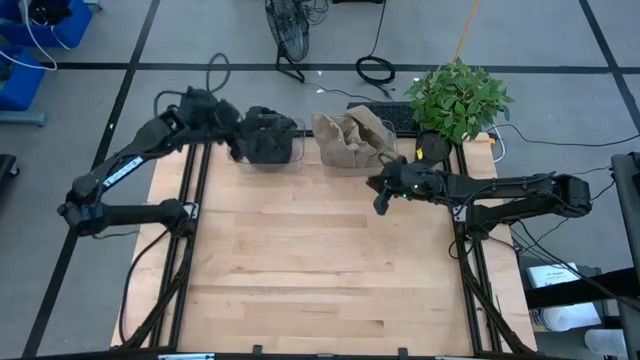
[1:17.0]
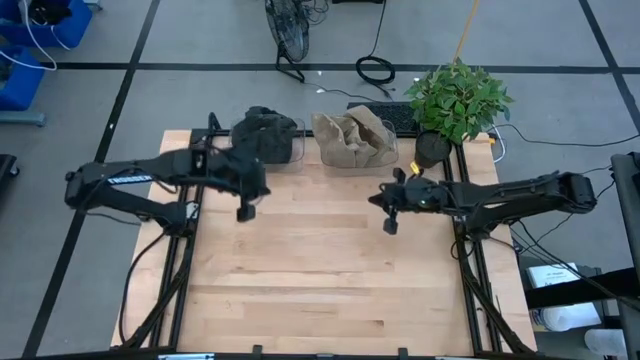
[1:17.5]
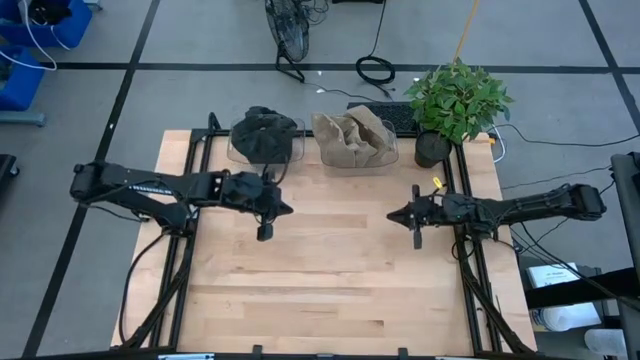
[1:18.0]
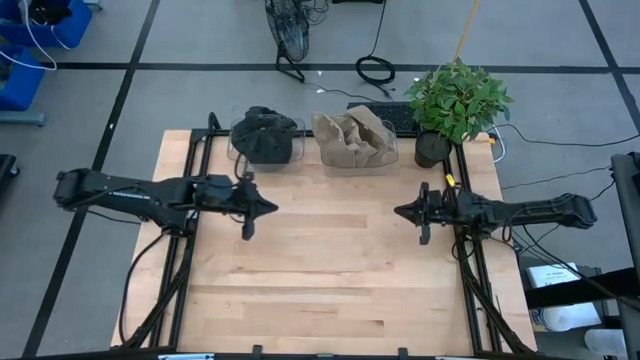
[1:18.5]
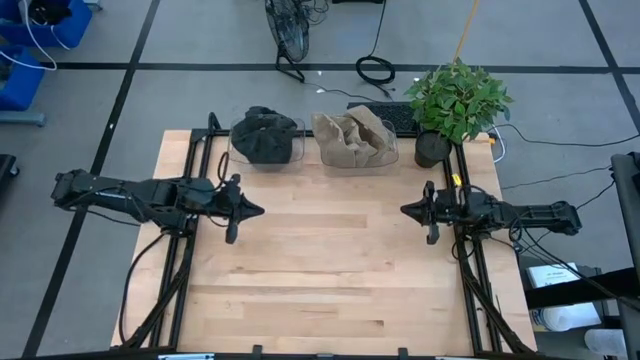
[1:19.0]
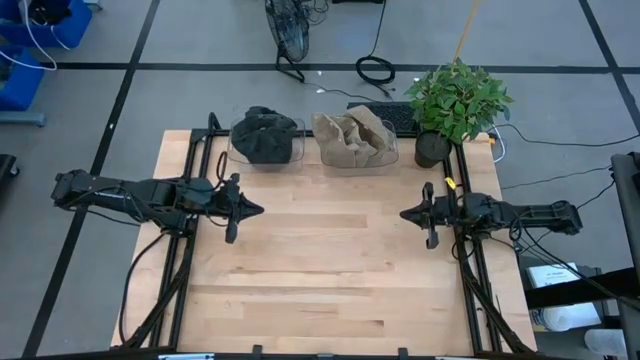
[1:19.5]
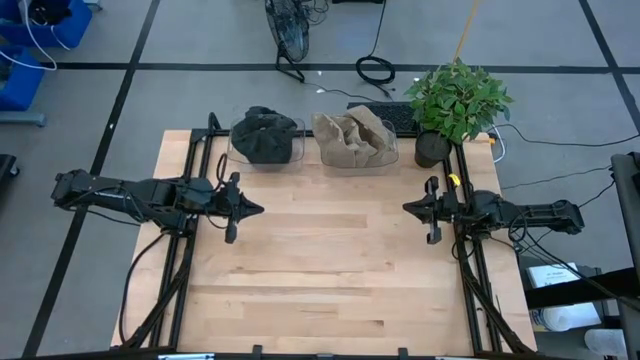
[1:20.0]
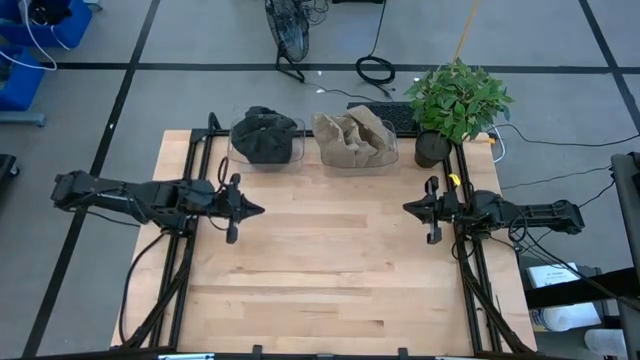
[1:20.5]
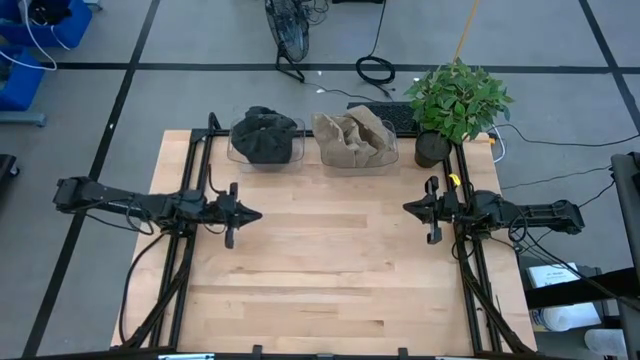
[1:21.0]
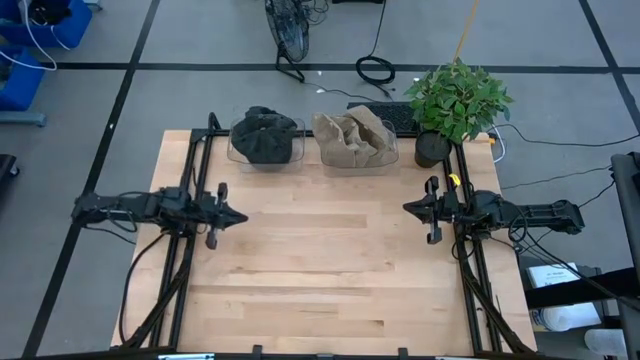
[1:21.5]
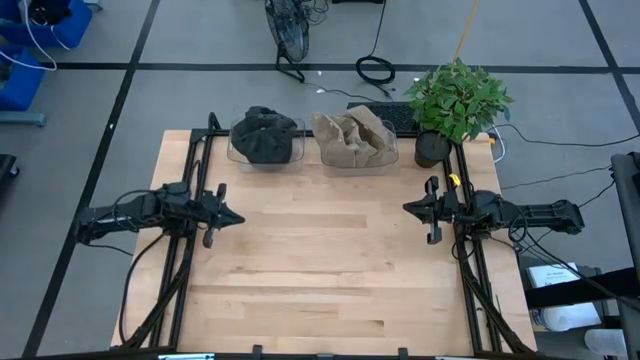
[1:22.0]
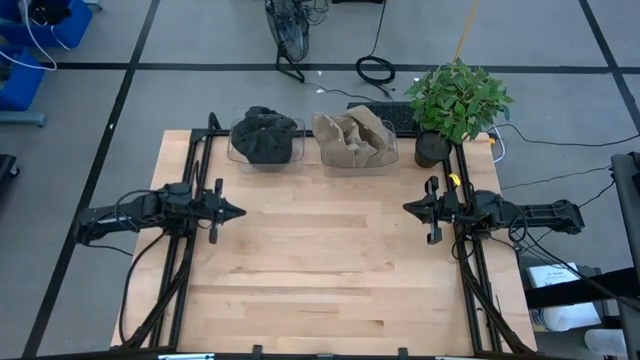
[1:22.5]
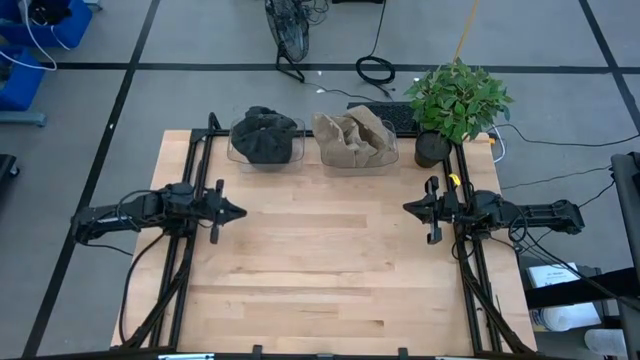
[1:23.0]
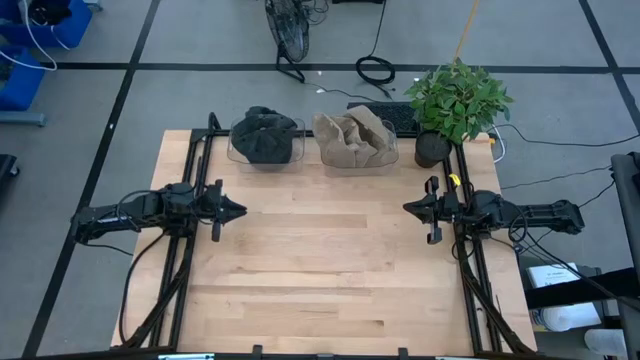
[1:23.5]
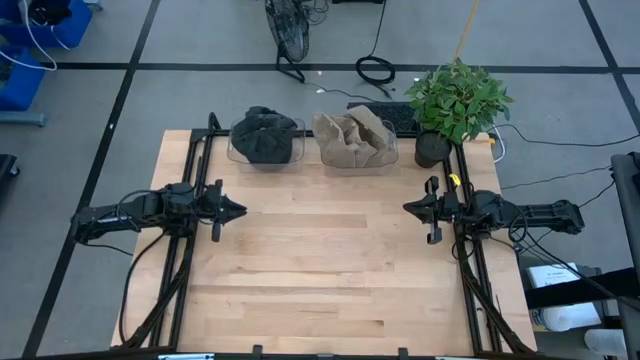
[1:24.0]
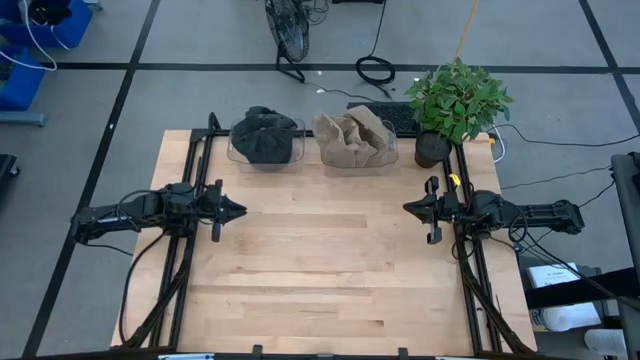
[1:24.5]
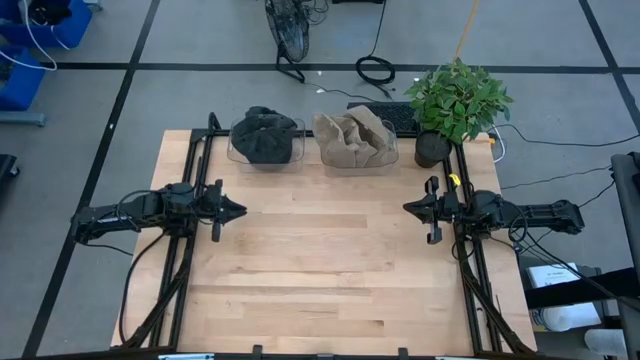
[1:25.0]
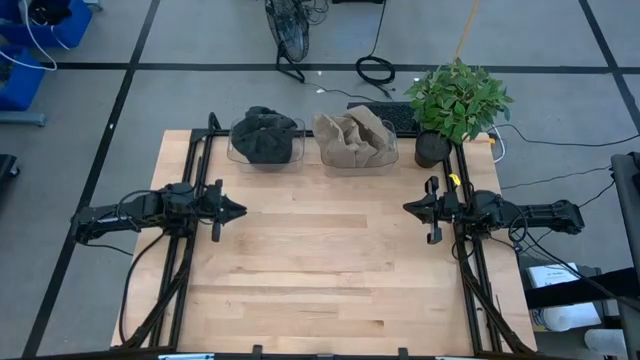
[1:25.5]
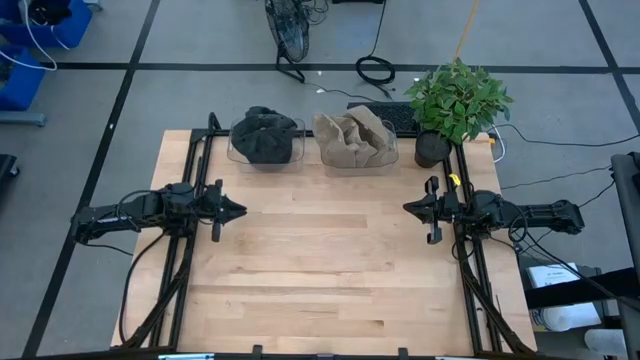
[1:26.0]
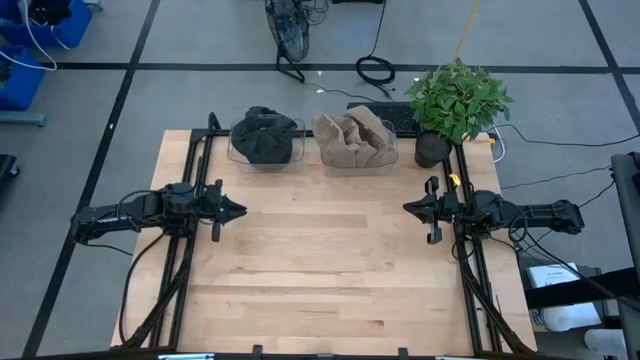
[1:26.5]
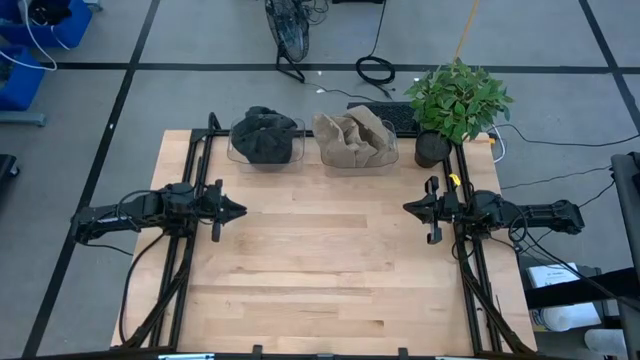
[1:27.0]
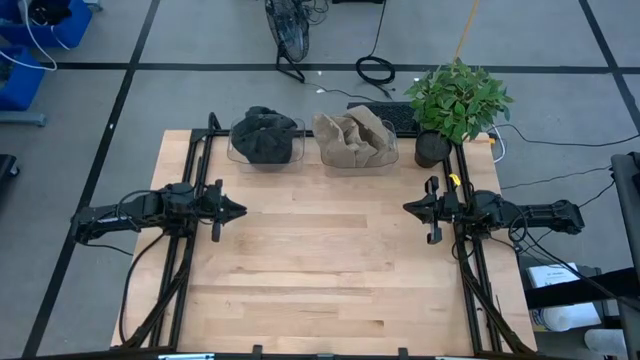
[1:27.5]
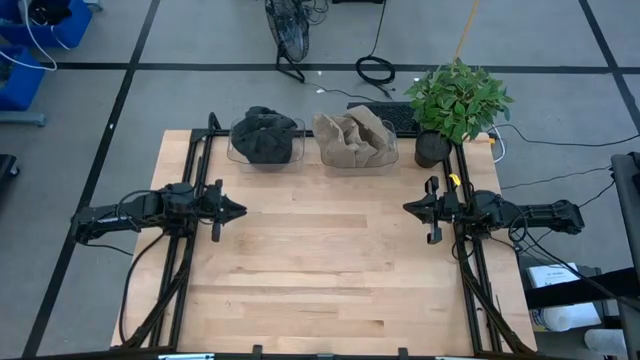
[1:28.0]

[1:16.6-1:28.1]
Task: Pick & Place hat
Return to Home Position

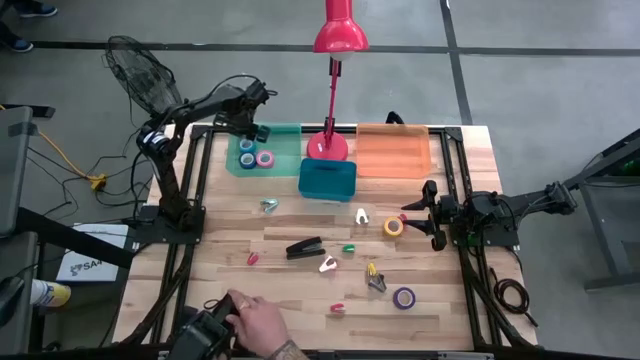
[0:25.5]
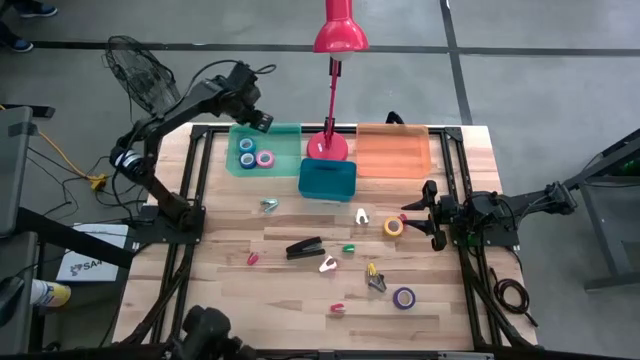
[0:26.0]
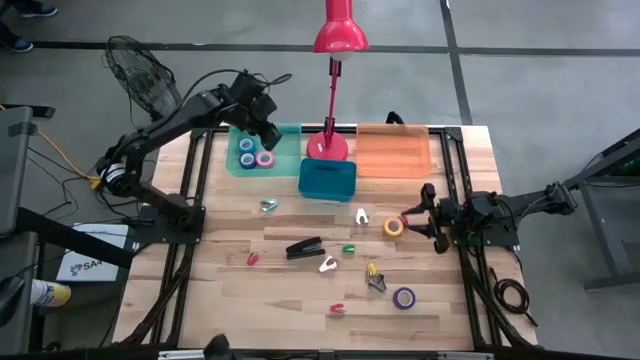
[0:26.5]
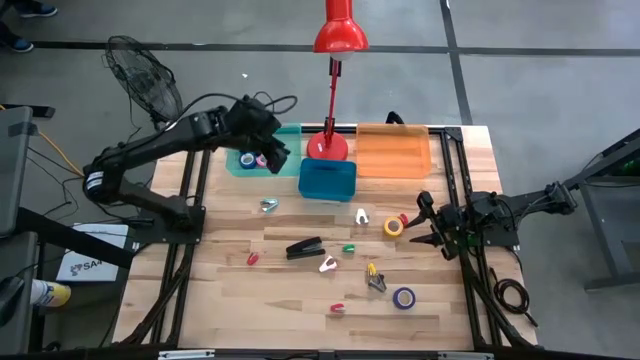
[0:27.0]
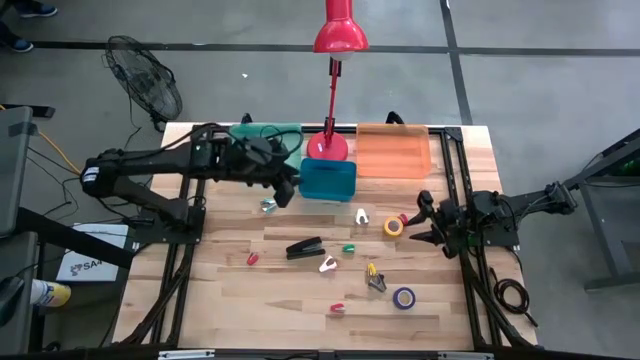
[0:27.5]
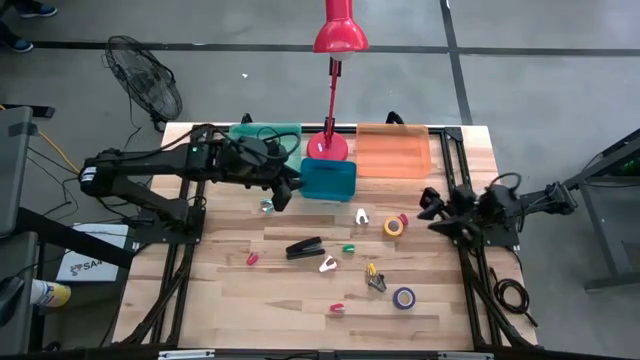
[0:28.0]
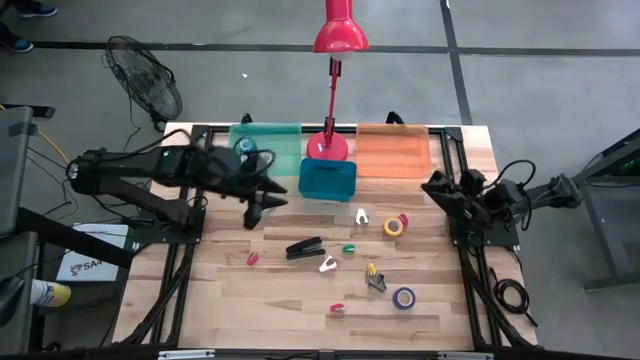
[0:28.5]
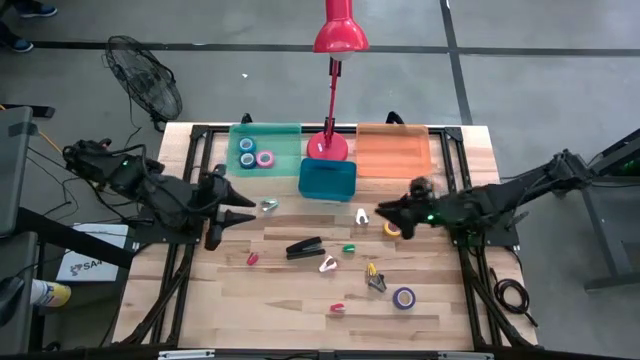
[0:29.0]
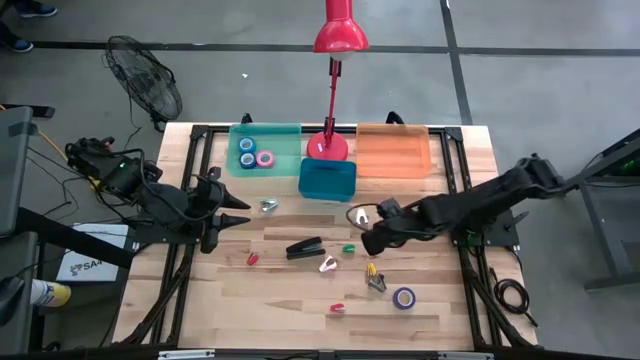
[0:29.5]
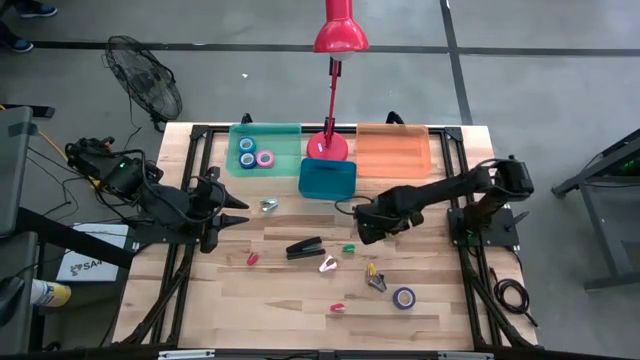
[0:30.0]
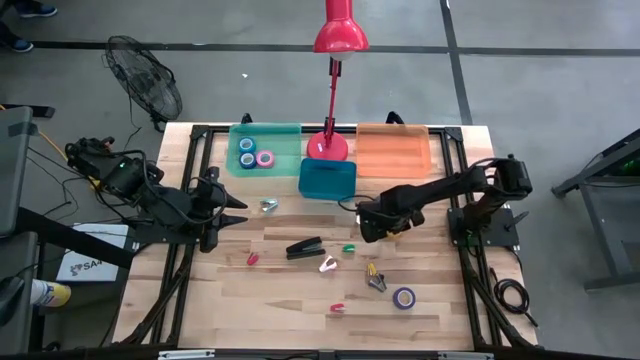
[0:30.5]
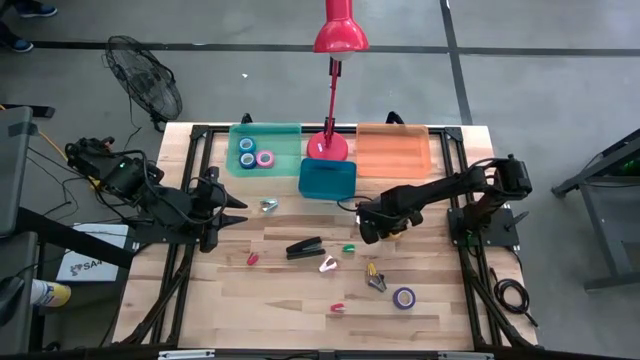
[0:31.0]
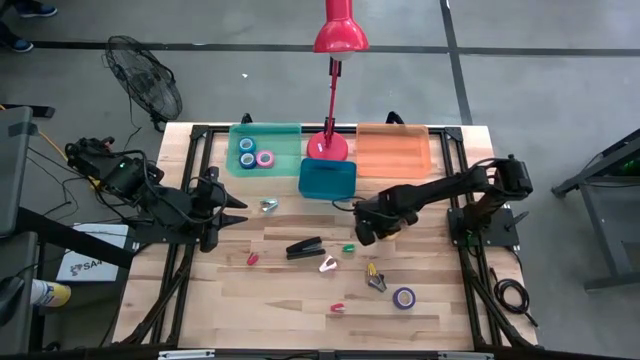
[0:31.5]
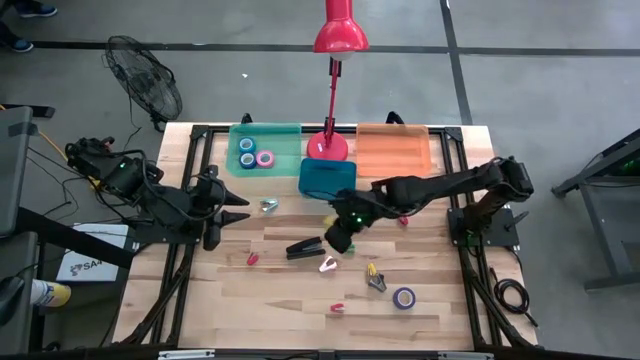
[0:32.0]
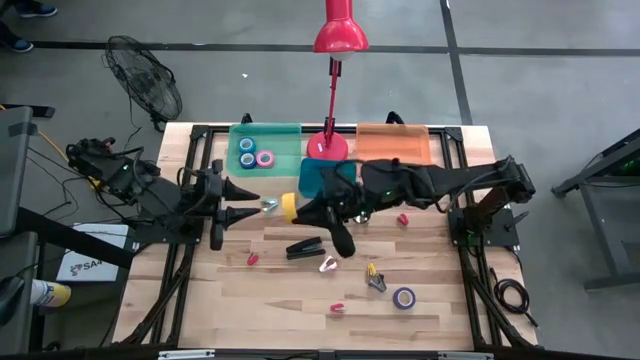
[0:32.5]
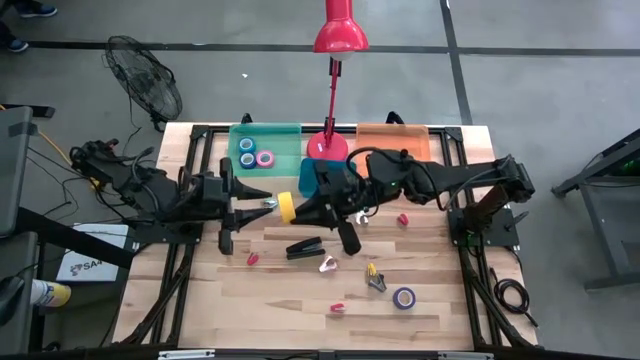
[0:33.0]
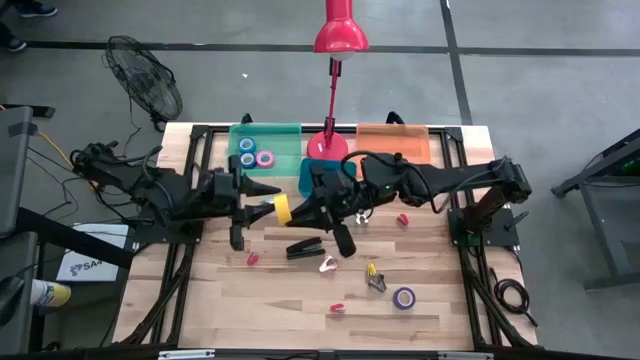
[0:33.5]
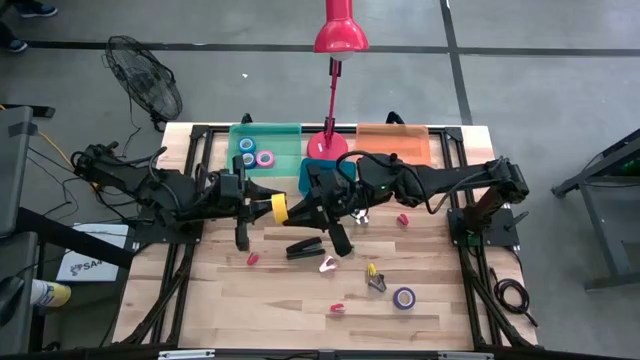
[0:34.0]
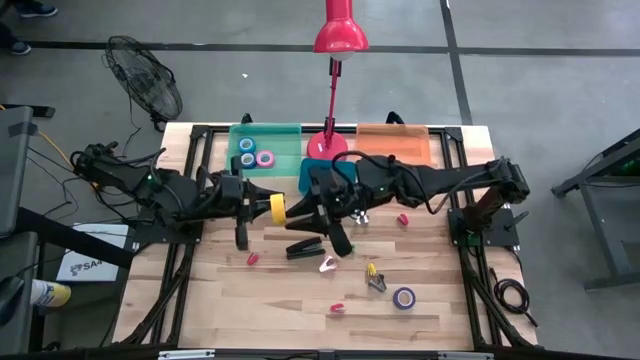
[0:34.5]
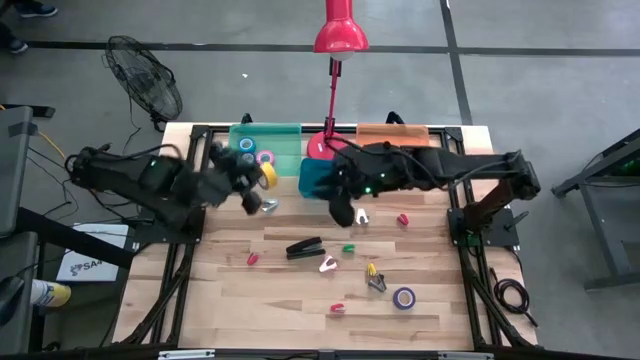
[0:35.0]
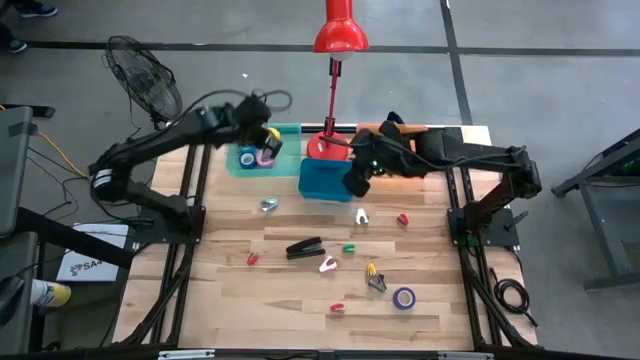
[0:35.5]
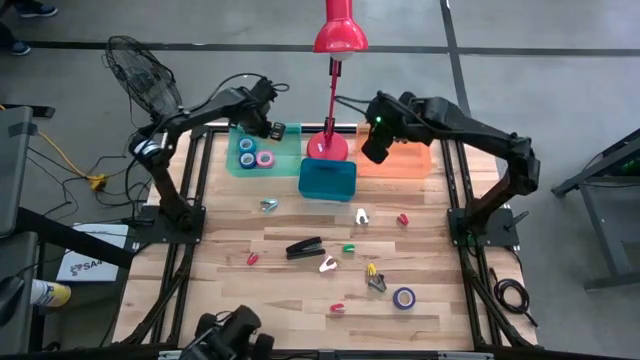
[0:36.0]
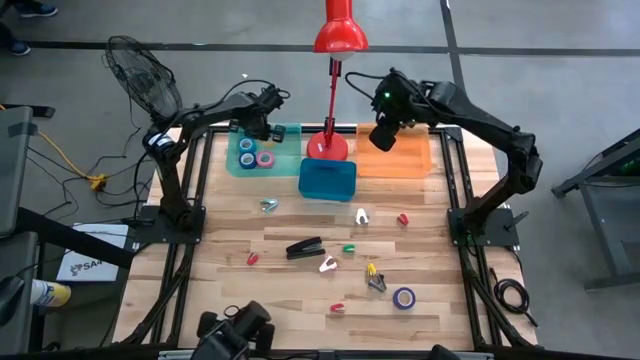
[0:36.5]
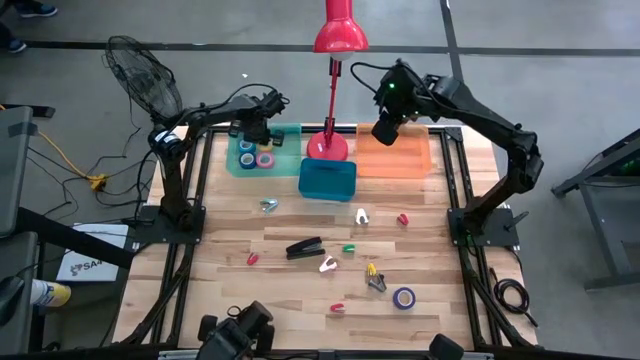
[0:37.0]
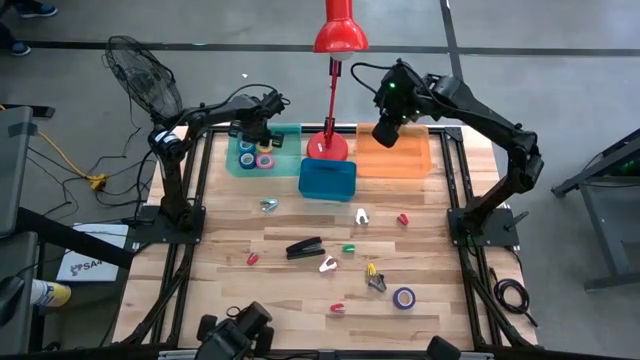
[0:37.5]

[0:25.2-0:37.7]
Task: Pick and place Stapler, Stapler remover, tape
Put the yellow tape into the light green bin
